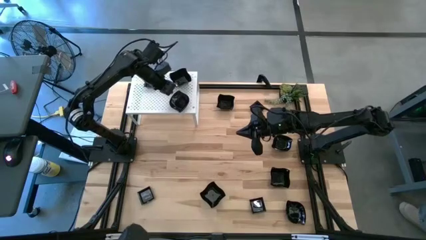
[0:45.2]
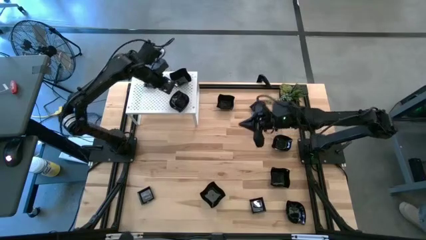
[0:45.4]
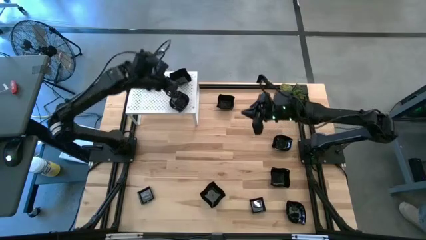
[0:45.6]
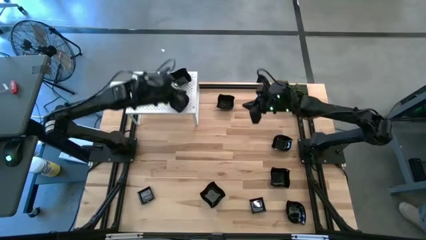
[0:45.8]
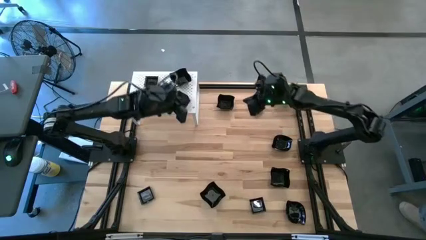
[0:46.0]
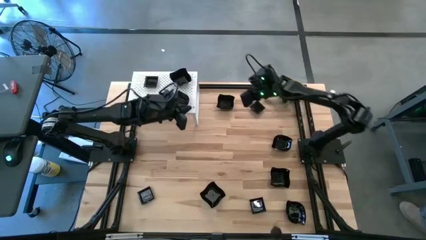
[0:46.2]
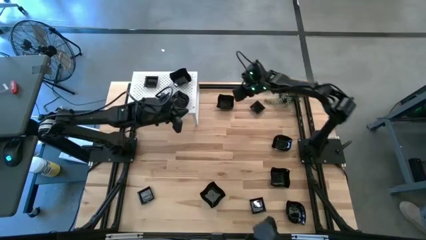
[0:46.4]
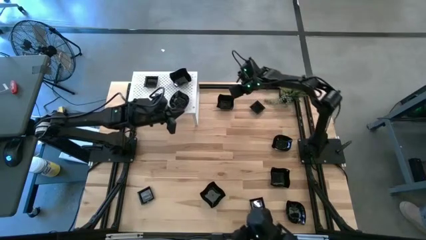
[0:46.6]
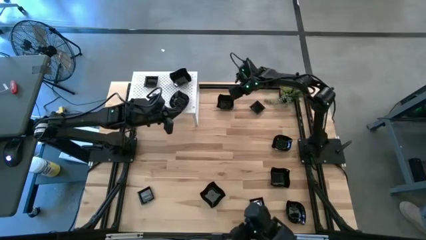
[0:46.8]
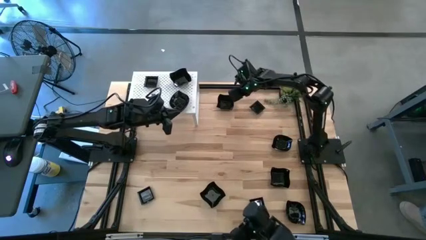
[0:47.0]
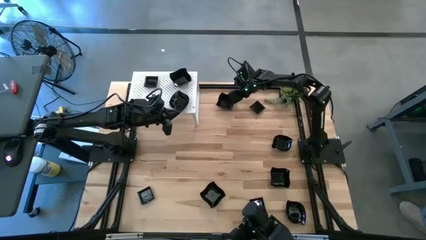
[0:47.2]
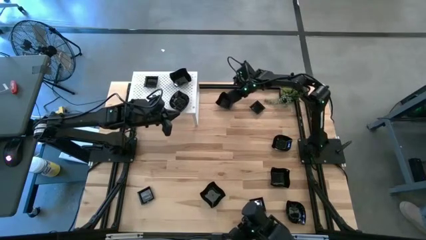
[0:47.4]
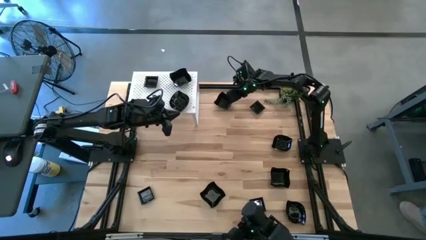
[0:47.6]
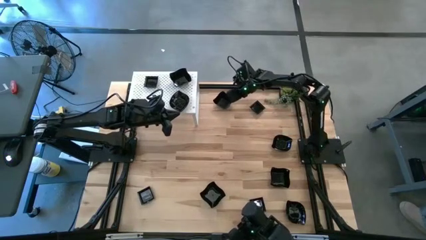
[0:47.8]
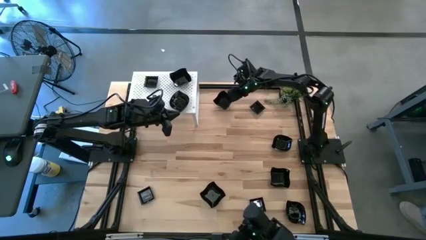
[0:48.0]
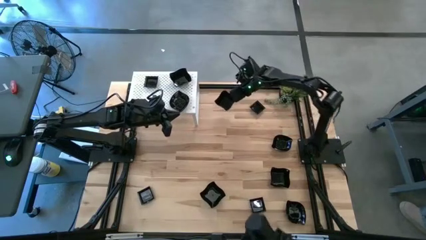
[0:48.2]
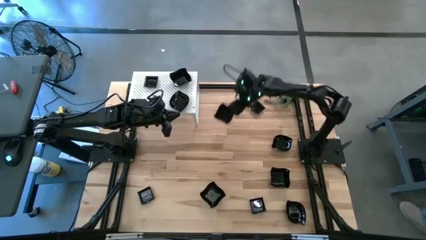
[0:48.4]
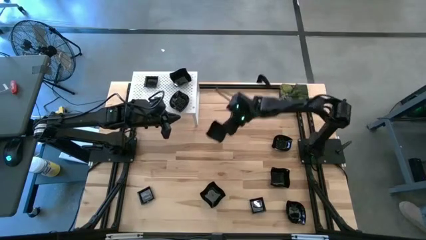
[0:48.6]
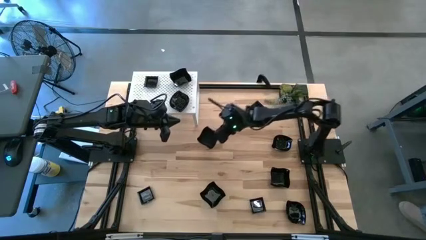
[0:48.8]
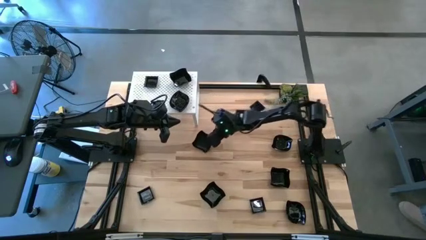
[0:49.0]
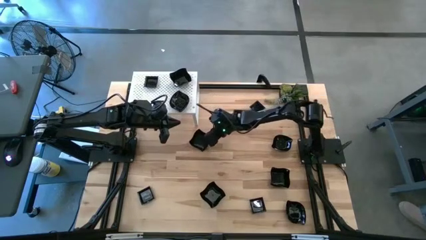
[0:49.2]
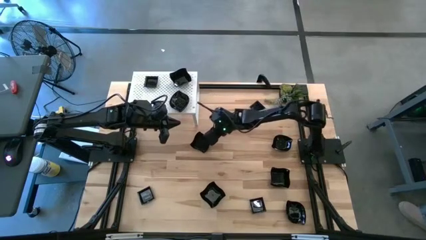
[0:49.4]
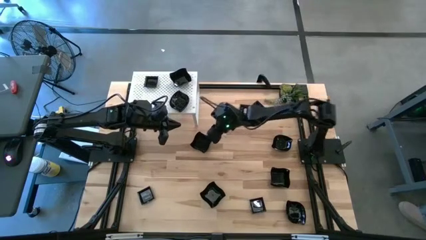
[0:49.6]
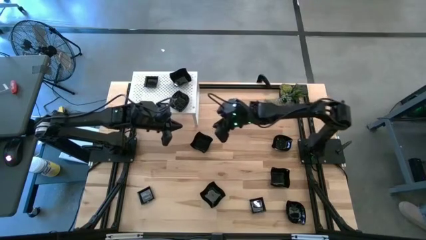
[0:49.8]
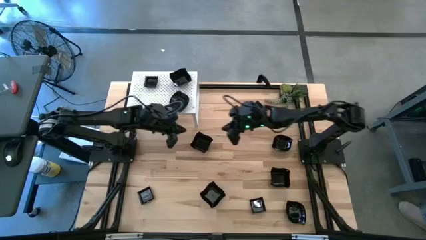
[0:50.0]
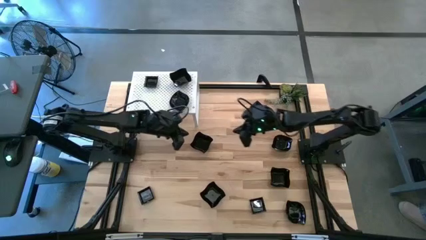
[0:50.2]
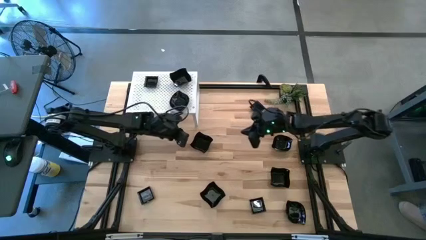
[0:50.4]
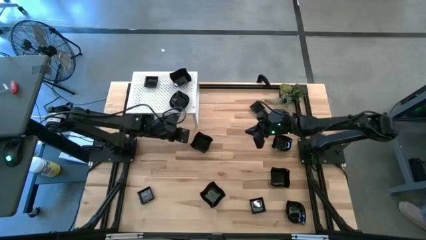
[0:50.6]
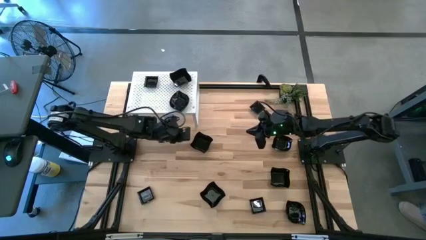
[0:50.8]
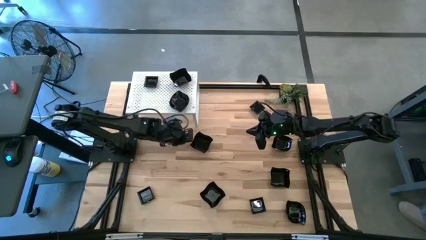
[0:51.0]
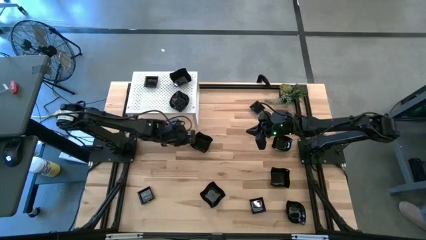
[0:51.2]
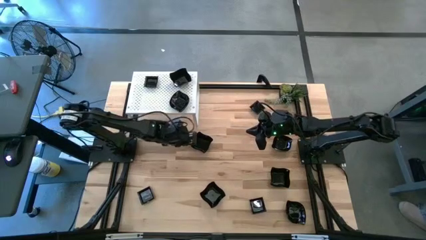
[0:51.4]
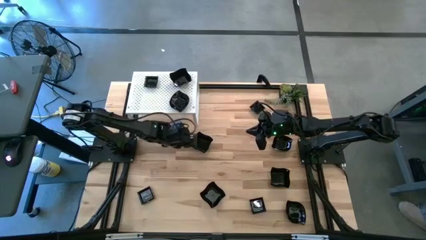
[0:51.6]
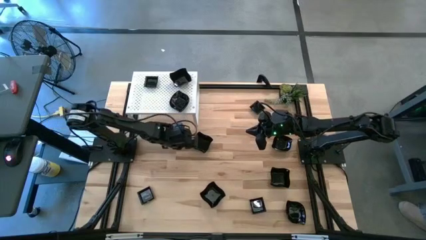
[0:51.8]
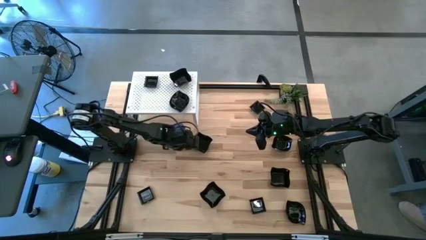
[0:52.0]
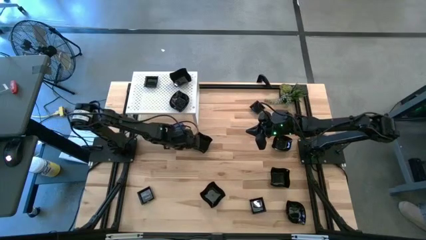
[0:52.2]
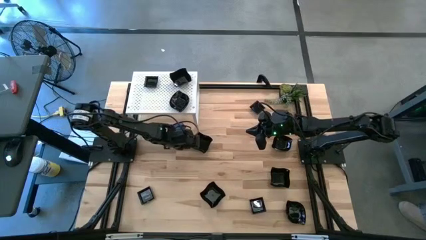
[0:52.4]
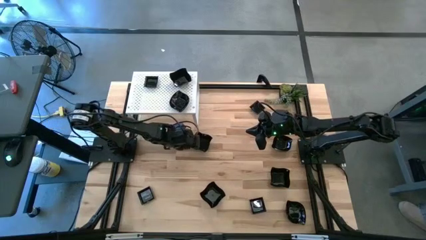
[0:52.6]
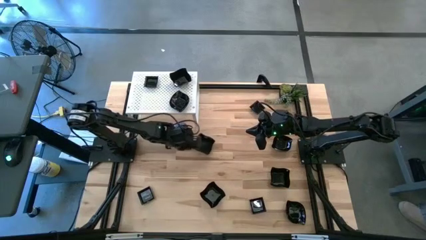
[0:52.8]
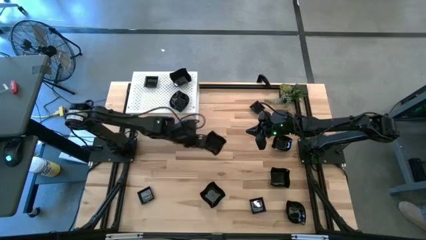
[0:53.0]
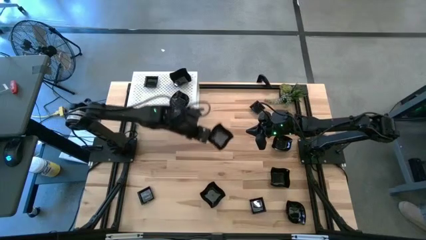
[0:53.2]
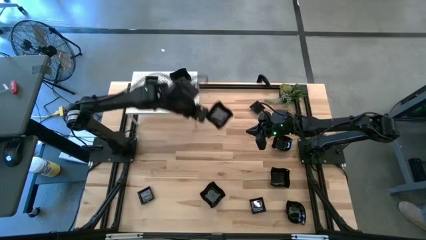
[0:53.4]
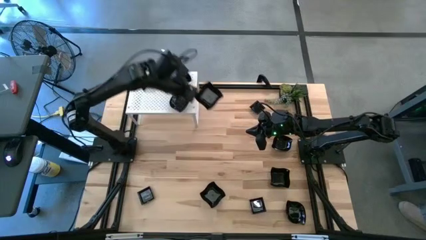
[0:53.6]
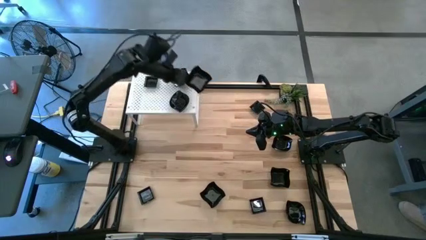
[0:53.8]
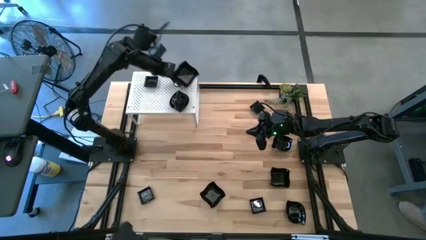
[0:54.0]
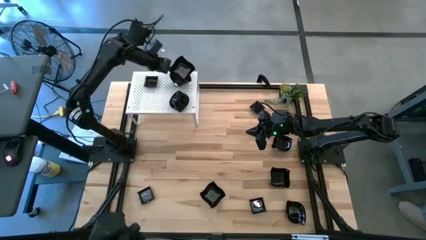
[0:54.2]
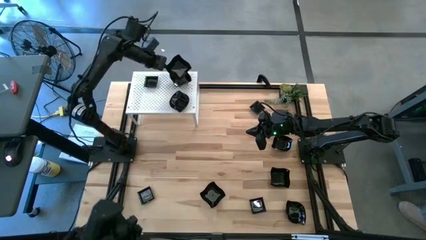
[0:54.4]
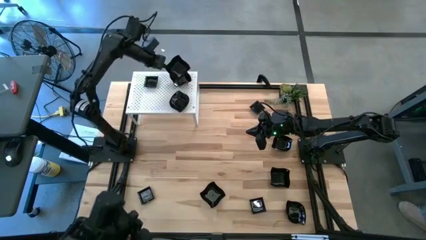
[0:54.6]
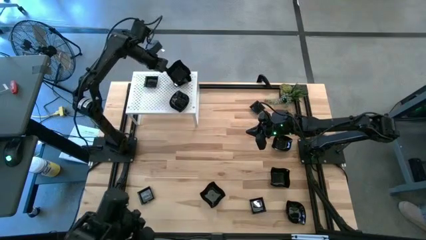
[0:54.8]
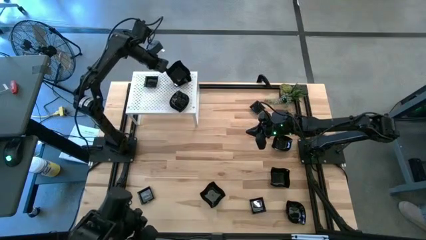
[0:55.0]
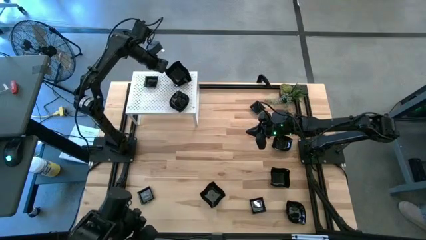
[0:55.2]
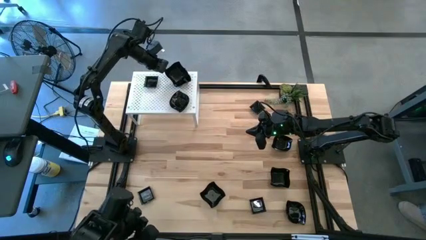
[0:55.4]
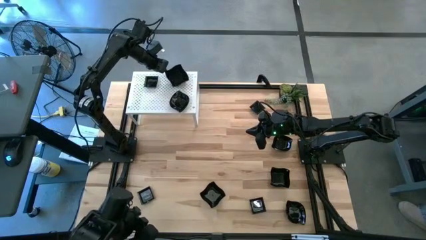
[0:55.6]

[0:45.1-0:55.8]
Task: Pick & Place Mini shaped plates
Stack the black distorted square plate on top of the other black distorted square plate on the shelf

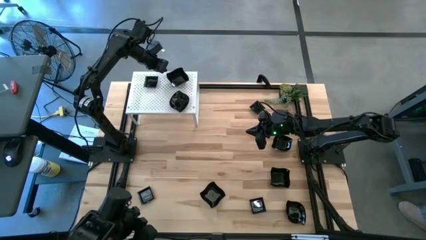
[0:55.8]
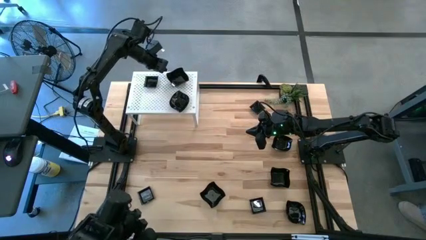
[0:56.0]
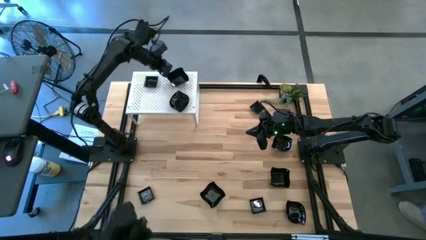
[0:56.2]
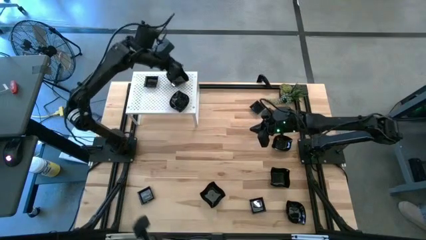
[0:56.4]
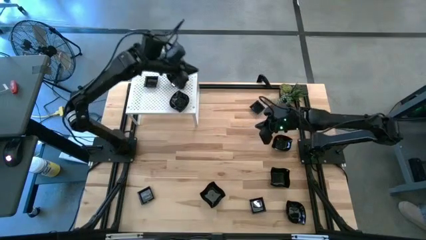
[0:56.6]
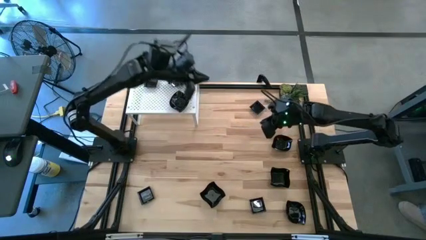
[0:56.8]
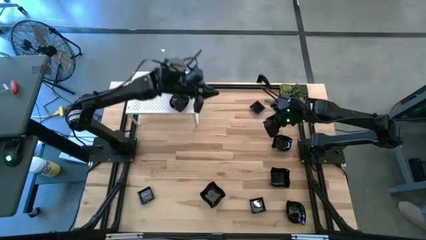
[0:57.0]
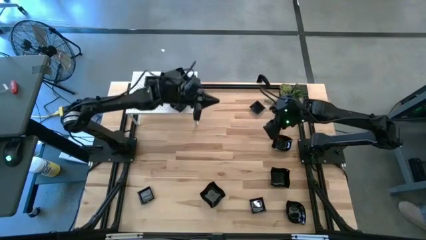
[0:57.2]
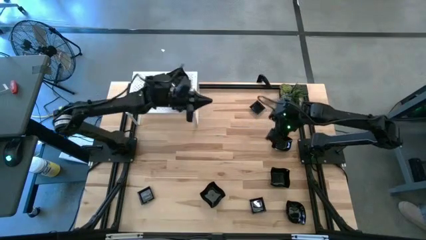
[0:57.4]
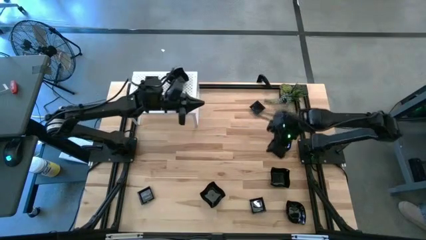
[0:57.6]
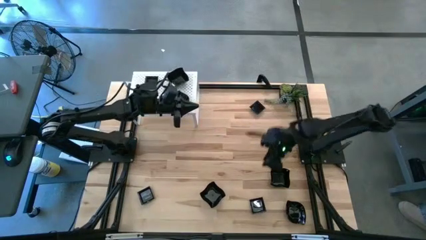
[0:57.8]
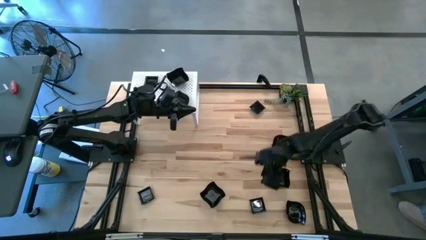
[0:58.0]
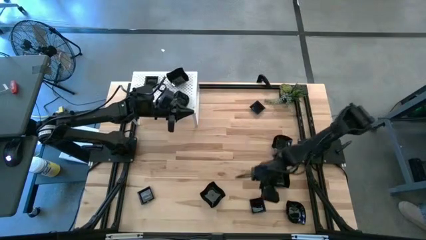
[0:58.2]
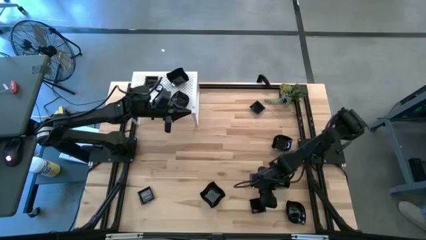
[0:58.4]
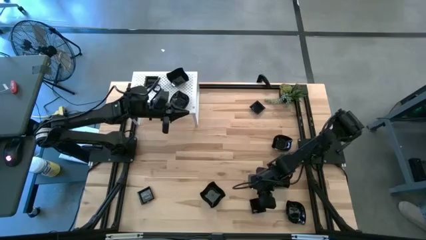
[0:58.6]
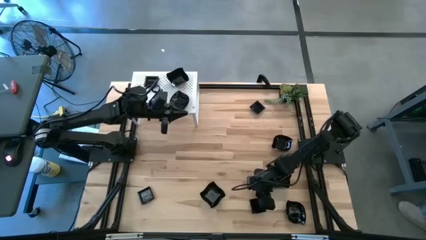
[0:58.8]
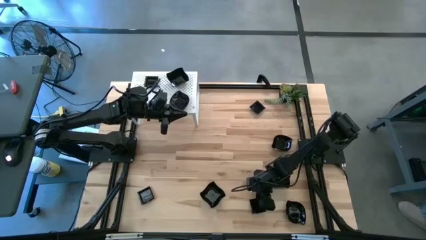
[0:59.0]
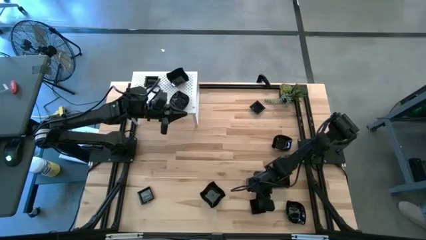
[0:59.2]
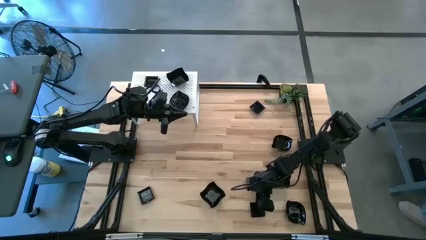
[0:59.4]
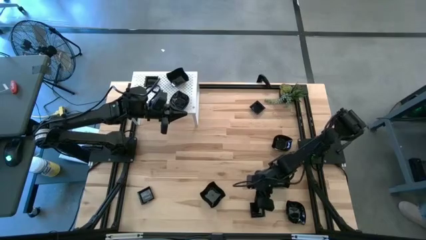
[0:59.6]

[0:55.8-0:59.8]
Stack the black square plate on top of the other black square plate on the shelf
